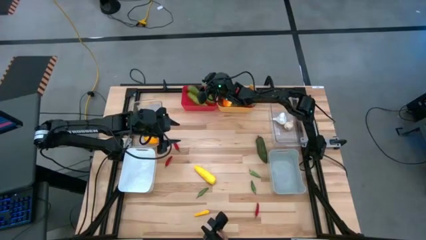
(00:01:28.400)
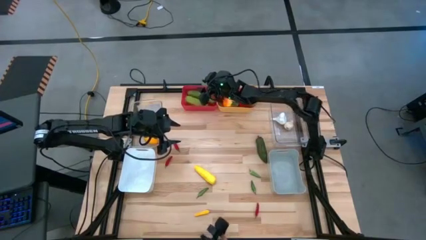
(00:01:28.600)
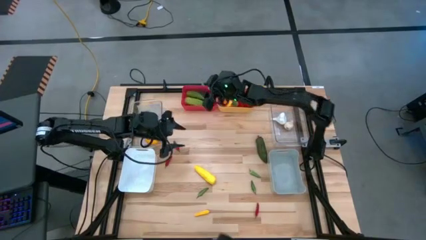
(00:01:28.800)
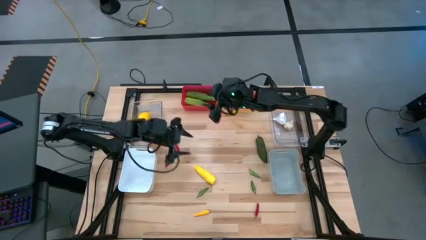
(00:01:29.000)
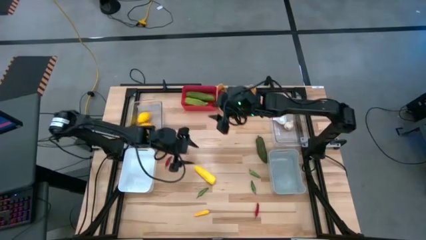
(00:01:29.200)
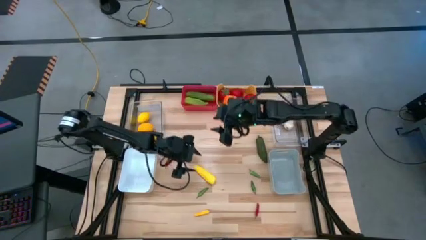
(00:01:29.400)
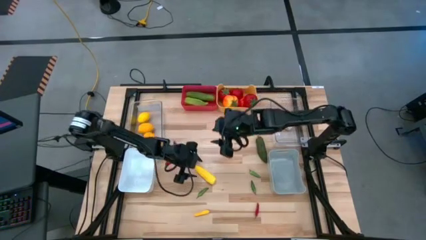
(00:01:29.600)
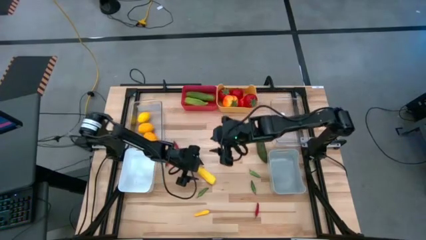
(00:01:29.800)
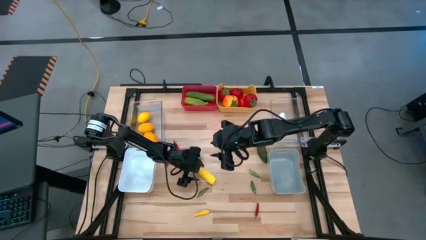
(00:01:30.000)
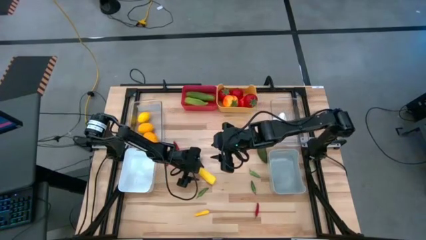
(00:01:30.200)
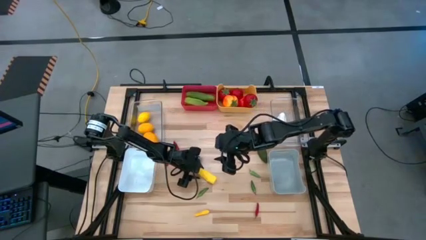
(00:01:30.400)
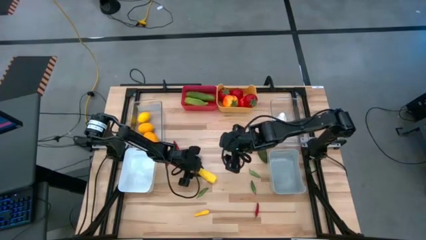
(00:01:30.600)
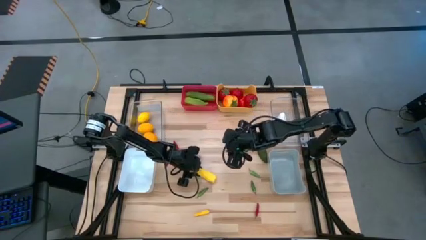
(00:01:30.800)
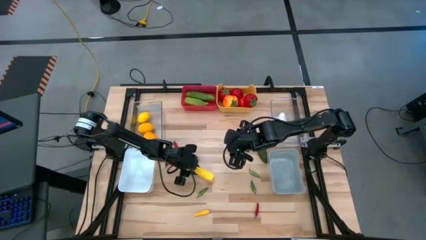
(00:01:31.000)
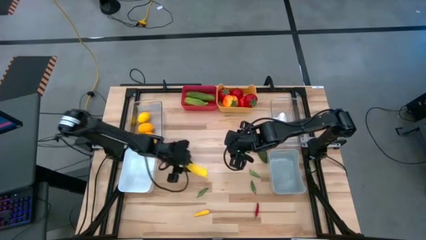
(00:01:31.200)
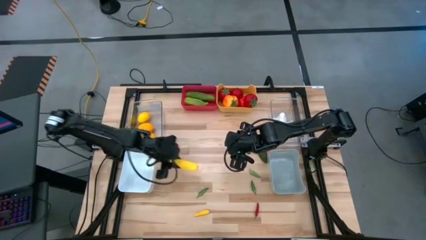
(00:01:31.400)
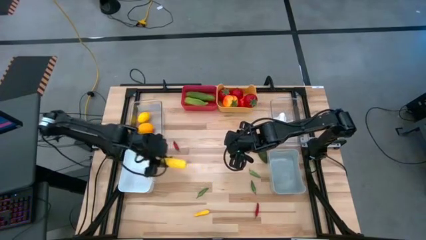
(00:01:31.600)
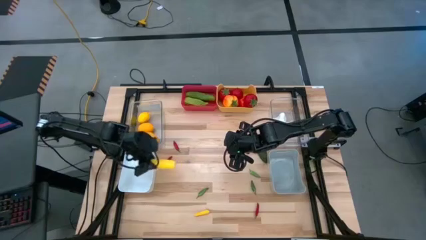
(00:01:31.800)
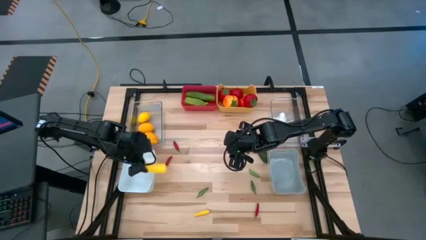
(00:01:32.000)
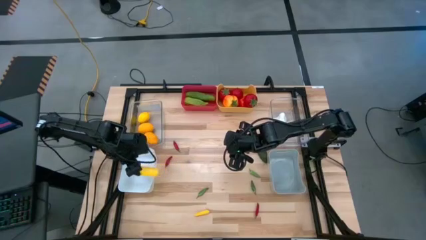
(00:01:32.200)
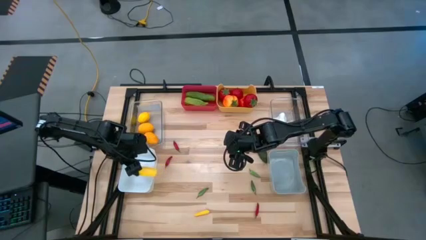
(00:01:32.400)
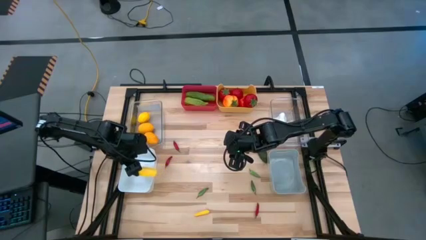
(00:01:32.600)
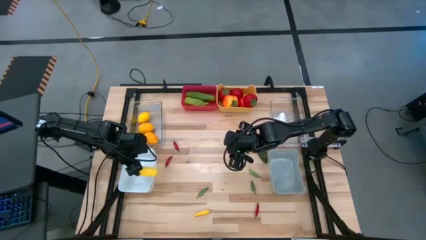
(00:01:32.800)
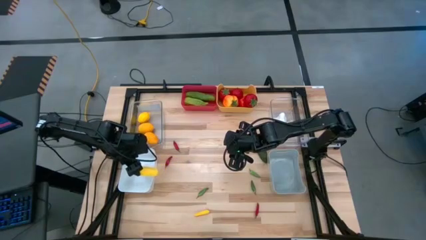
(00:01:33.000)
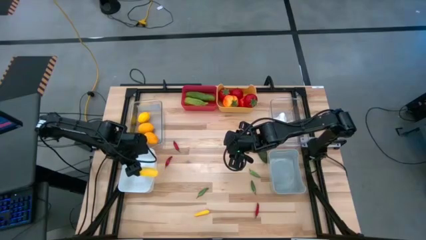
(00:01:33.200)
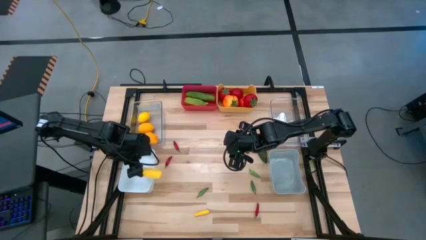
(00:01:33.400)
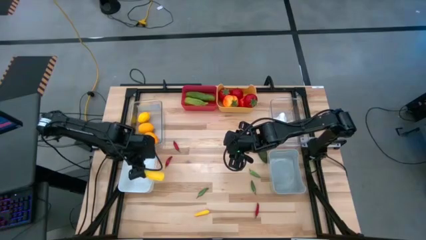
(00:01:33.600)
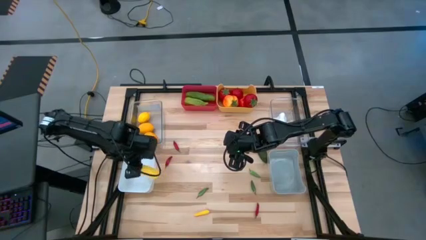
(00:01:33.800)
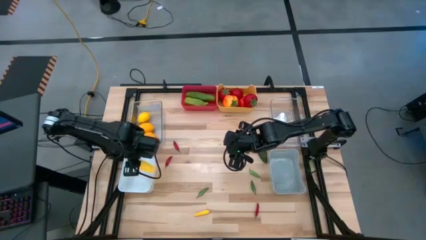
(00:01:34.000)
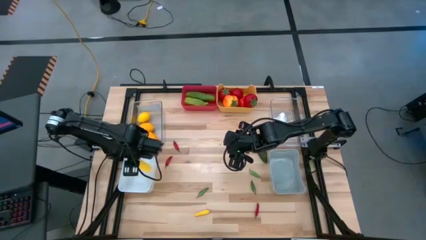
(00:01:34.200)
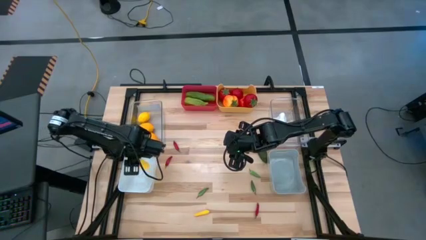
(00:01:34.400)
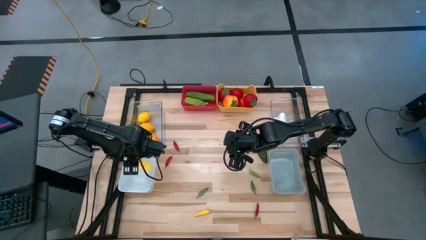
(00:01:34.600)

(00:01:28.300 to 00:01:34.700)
Task: Sort produce into baskets
Put the yellow corn into the white bin

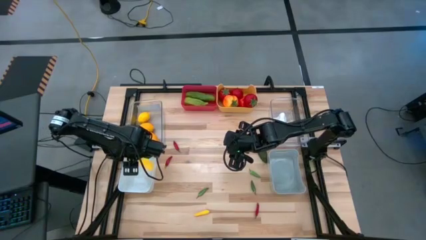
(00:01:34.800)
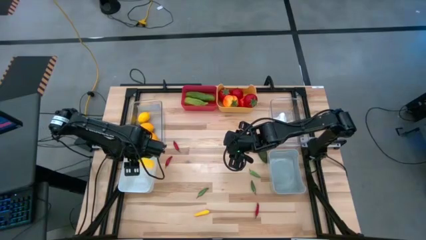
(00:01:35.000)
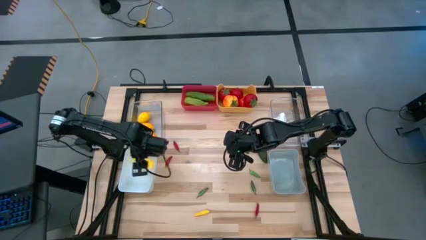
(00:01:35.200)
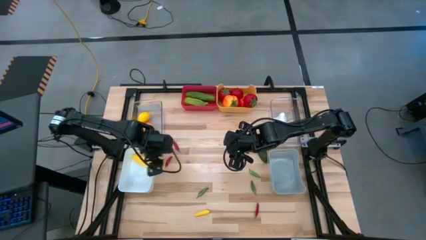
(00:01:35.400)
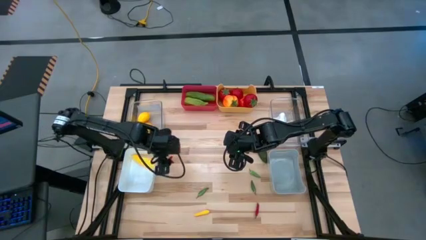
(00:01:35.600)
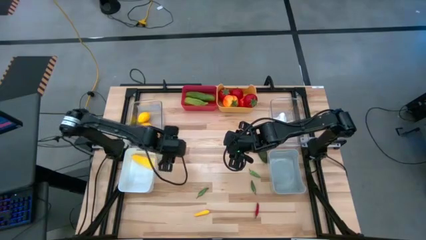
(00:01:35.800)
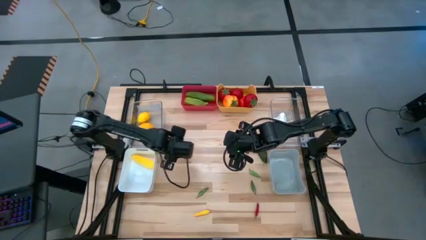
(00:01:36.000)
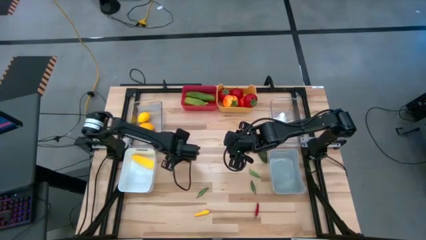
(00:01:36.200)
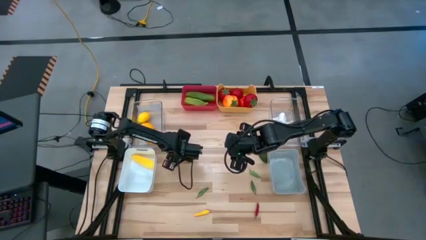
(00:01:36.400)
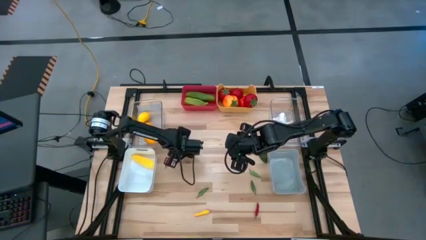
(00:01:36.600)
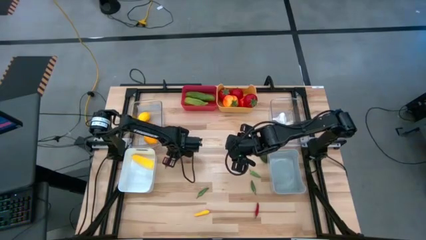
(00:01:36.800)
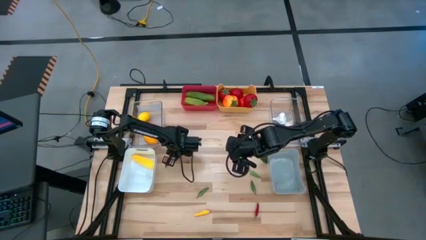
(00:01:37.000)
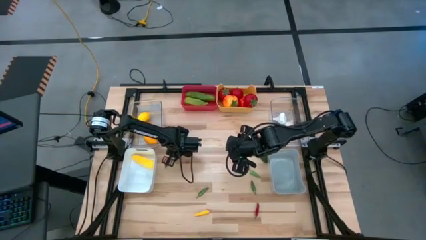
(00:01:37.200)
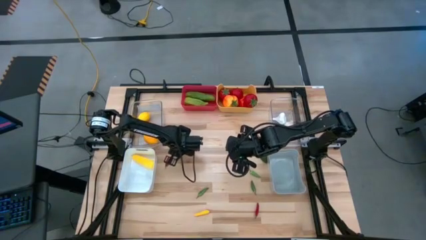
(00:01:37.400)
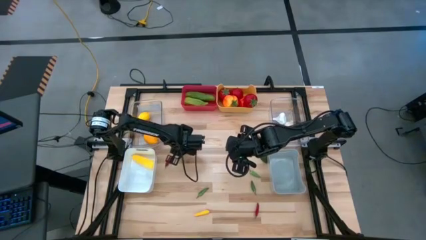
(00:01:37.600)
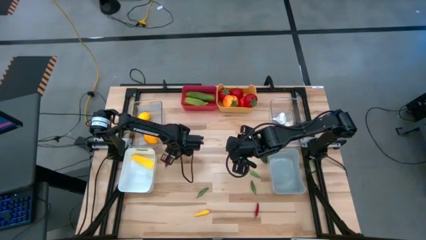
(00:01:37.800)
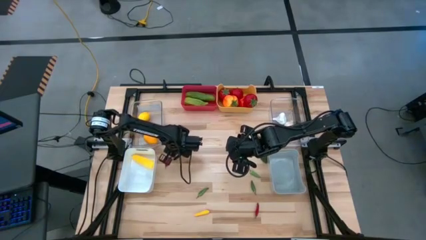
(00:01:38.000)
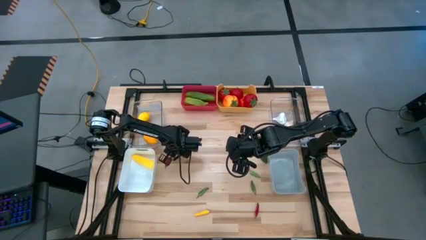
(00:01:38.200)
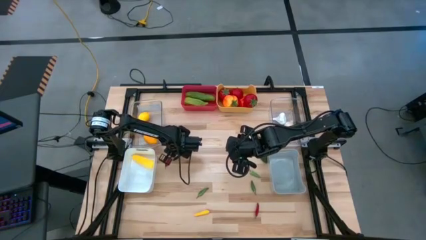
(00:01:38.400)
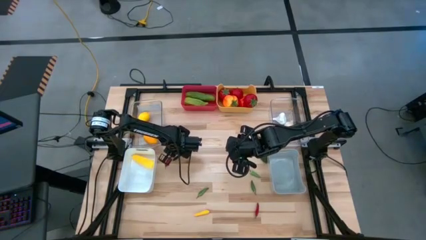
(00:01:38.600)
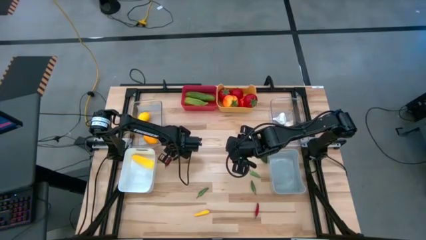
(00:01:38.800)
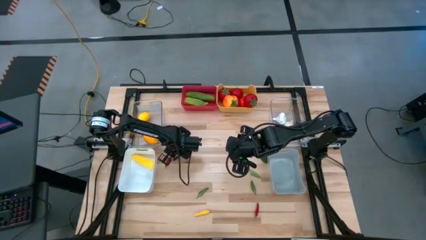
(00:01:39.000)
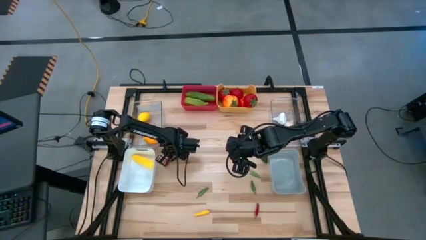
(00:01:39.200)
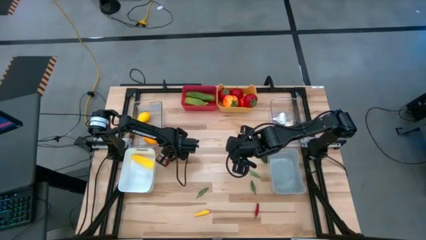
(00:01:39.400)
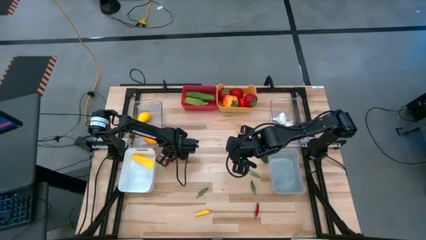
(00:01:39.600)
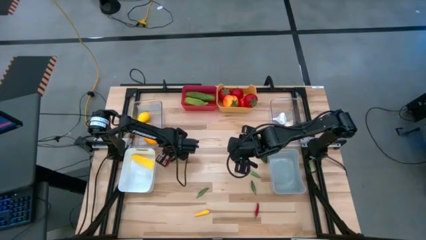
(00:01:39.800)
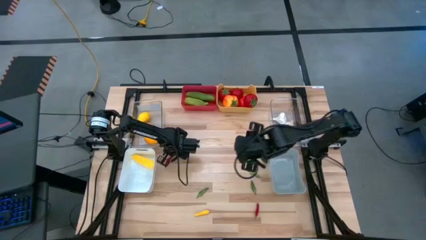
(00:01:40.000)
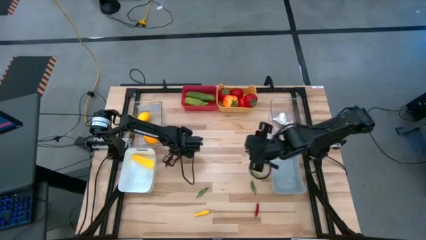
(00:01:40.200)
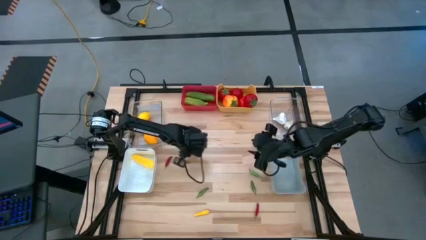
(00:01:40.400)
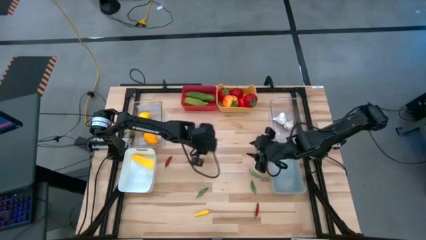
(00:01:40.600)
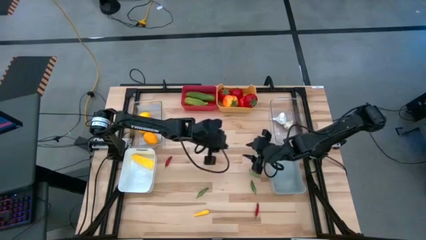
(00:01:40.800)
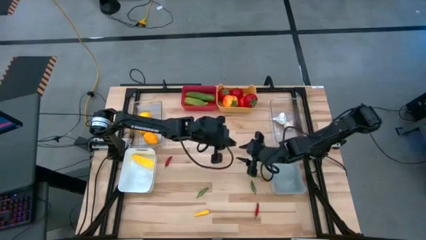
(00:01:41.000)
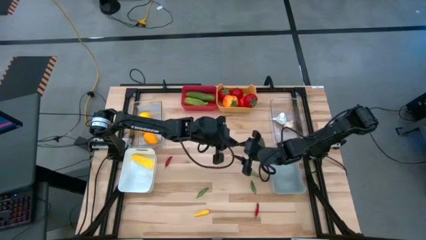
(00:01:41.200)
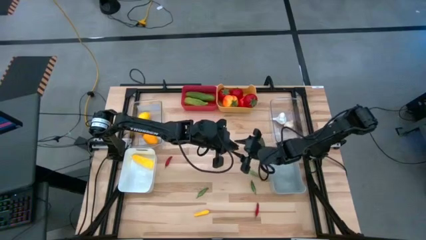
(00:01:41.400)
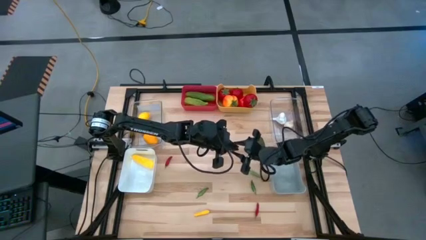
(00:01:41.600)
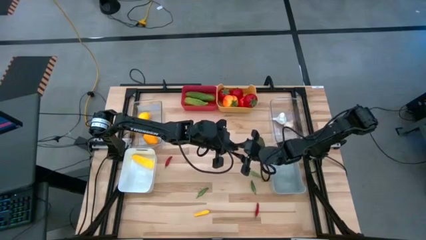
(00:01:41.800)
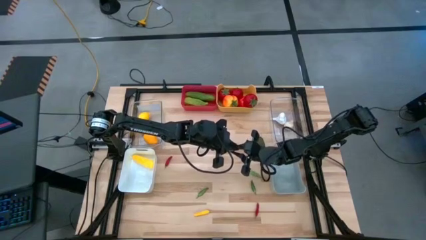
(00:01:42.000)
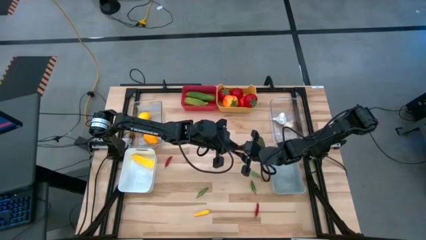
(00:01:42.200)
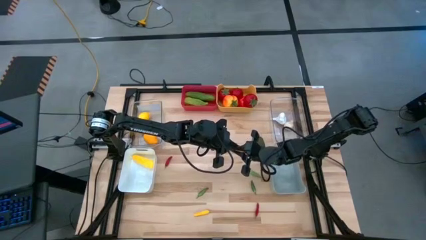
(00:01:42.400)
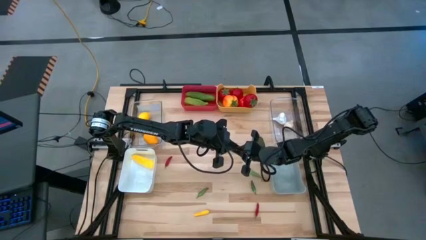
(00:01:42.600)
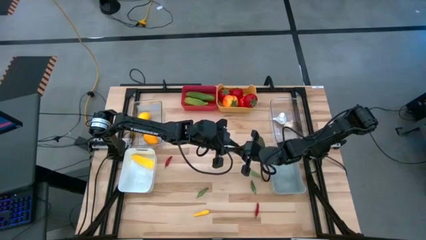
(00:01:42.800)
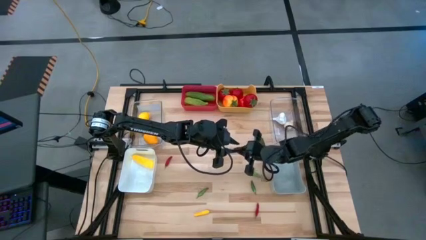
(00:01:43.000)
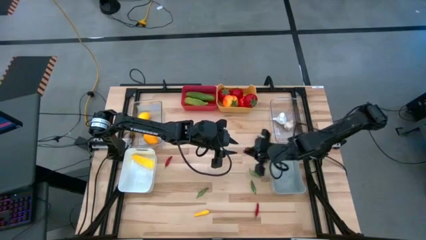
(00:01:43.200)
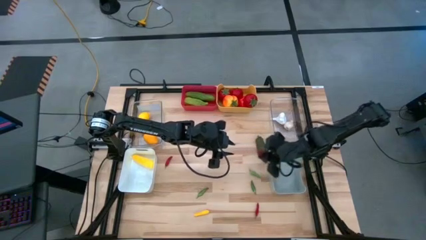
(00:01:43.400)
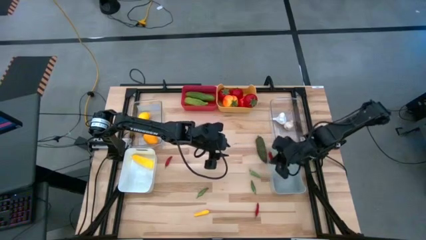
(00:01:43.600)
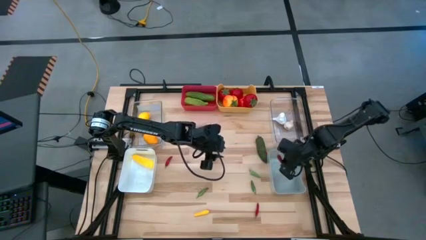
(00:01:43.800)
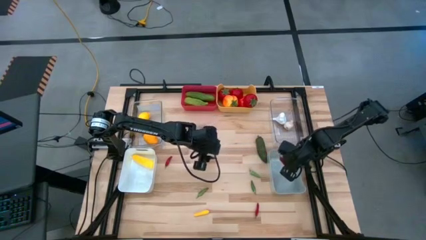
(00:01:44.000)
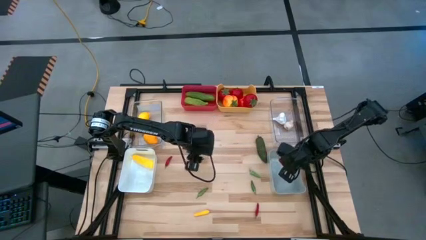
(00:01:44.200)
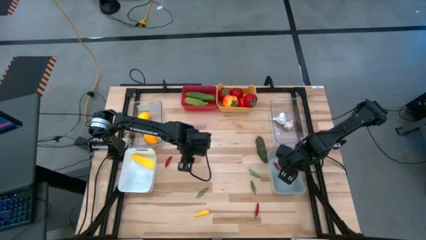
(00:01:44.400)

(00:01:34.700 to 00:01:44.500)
Put the red chili pepper into the gray bin
